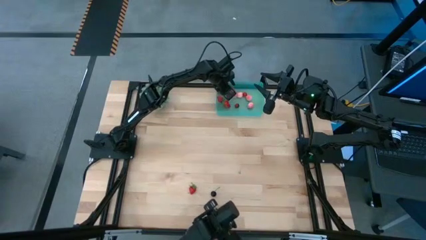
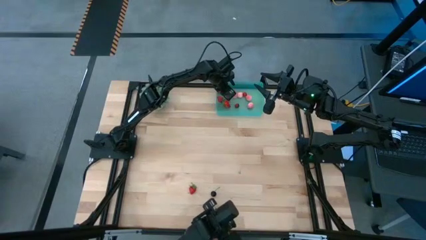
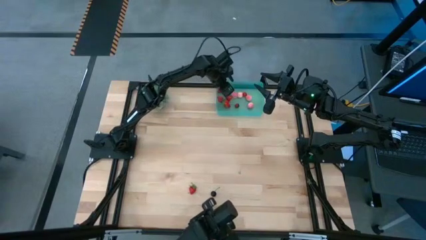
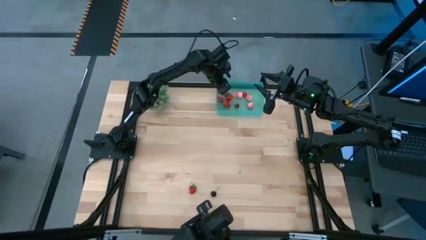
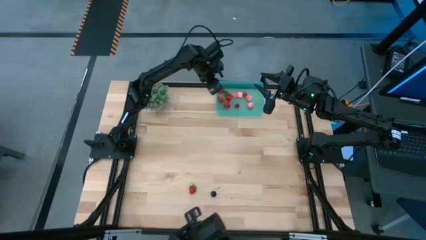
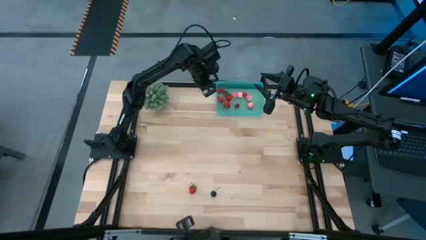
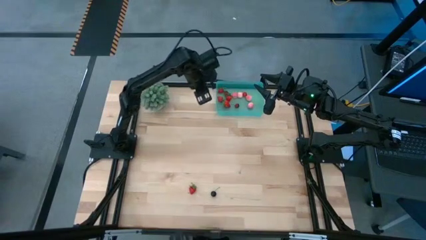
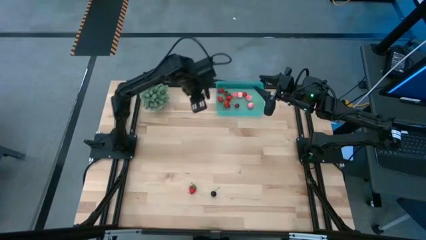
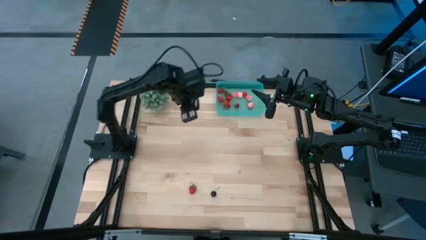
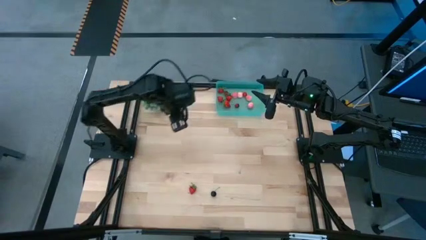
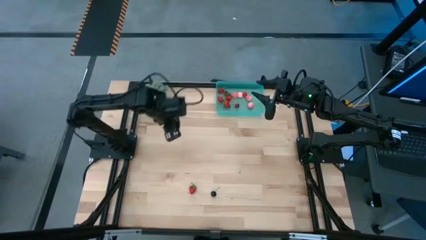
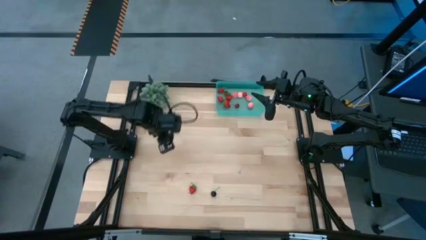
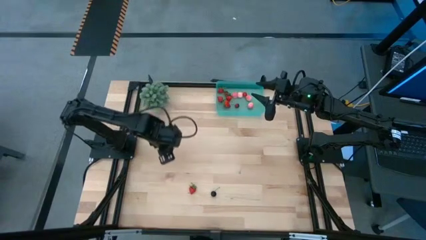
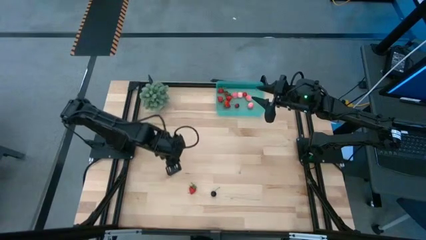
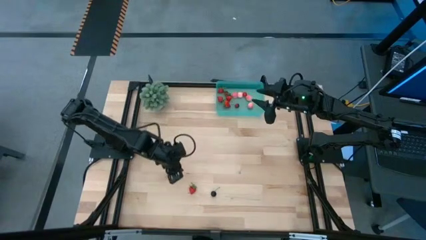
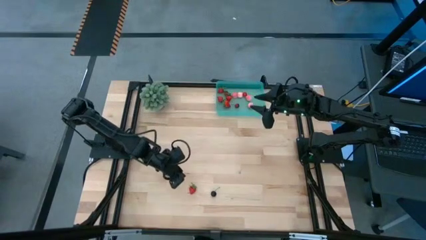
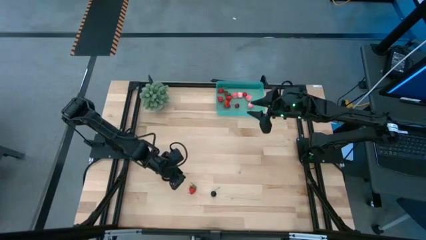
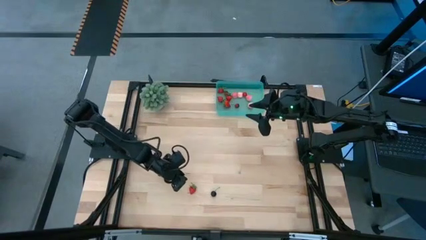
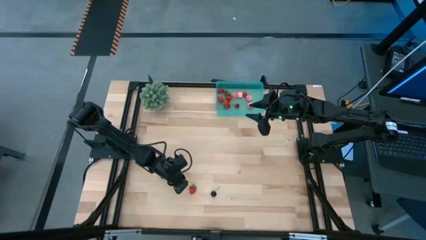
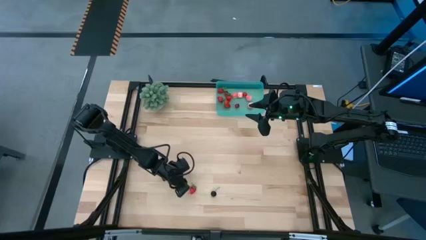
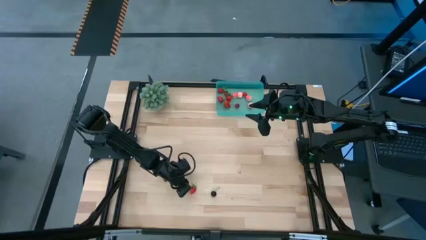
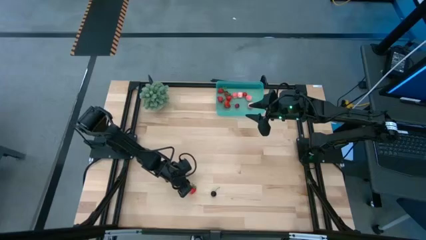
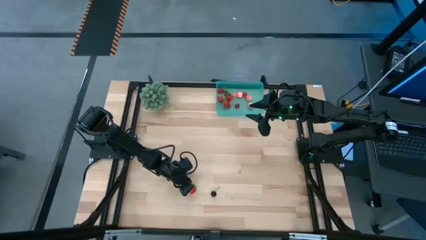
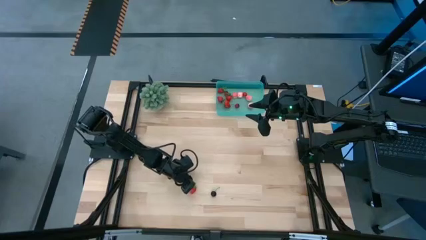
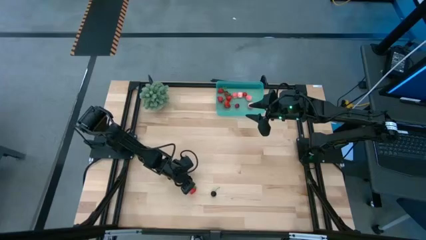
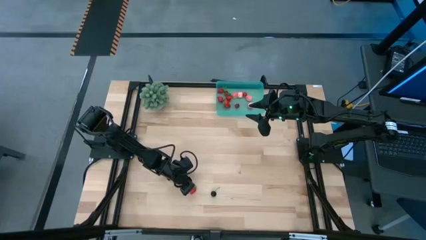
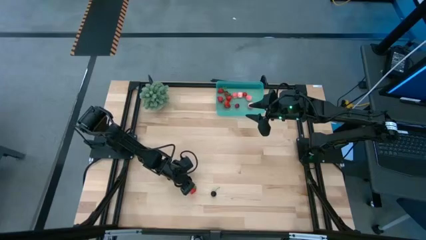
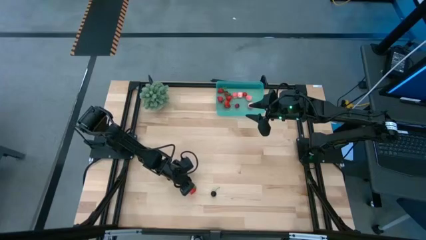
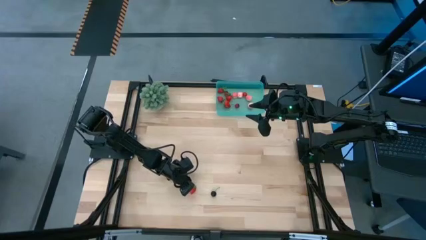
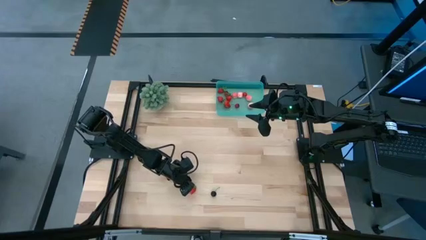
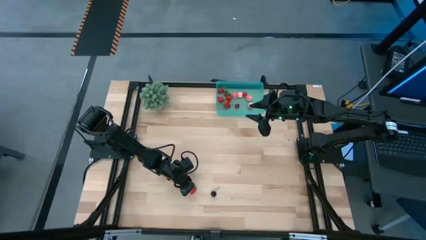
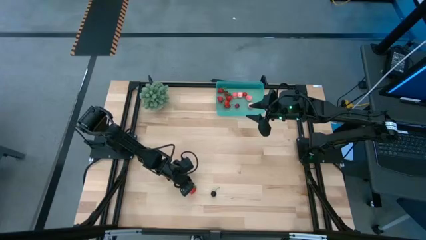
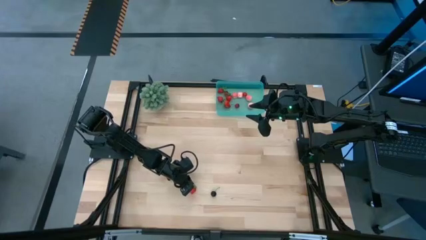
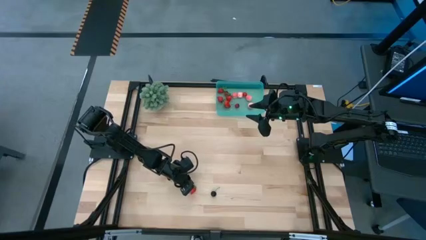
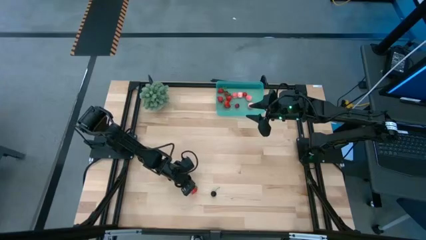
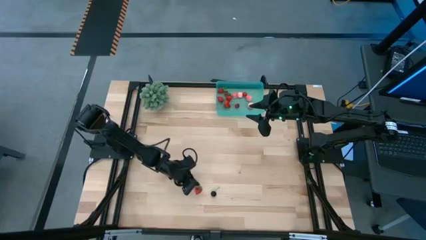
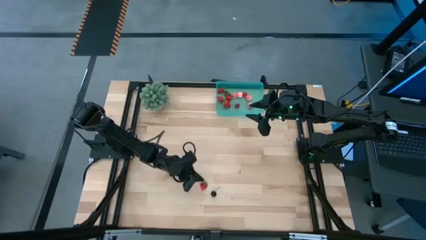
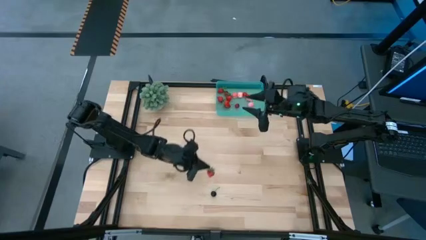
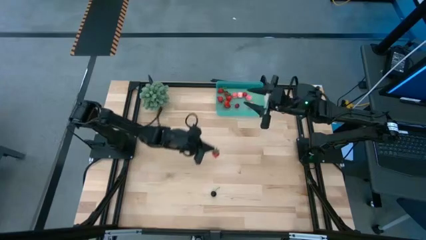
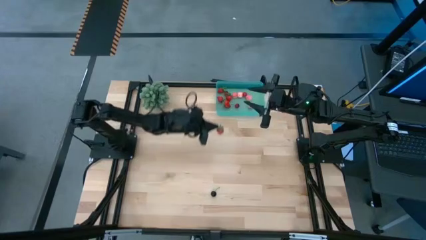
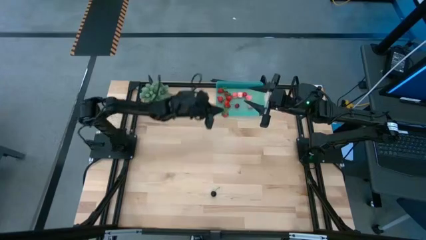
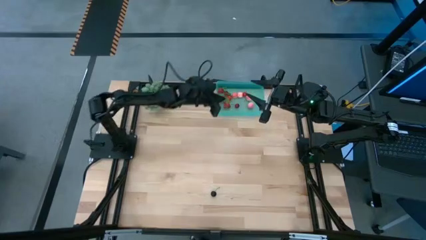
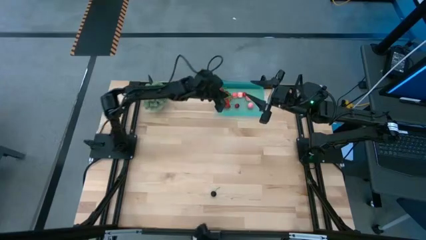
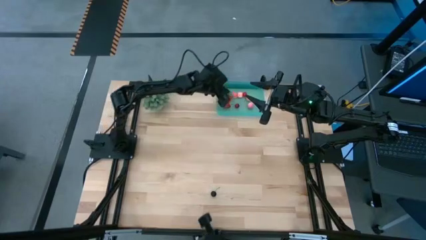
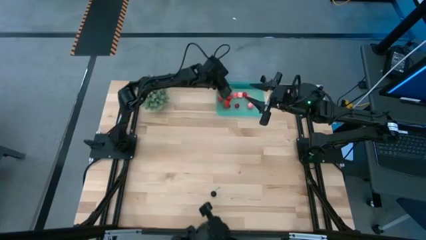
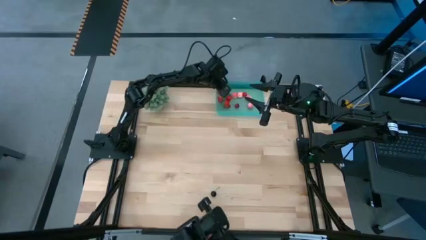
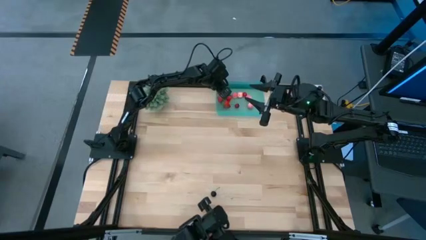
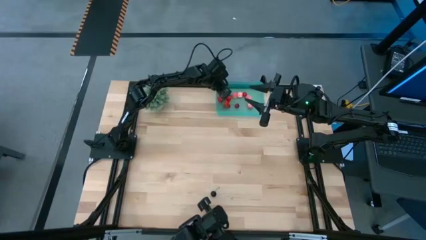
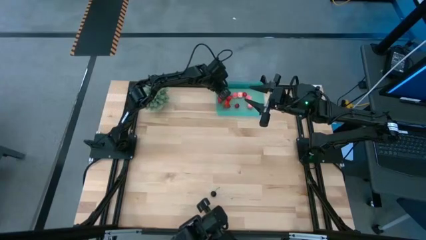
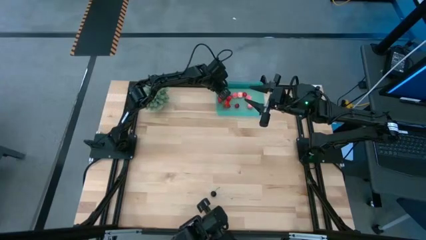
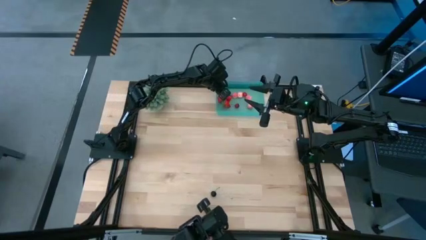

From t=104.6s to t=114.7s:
Task: Pick and placing Produce into tupperware
Put the strawberry into the blue bin

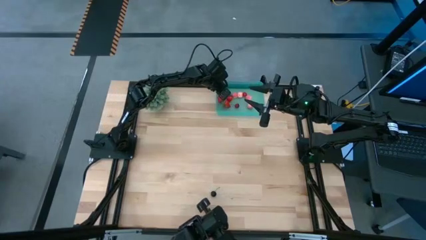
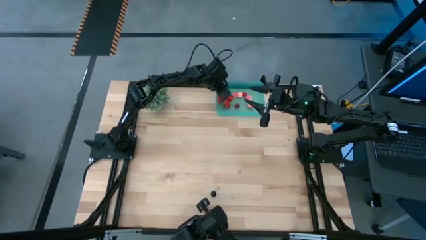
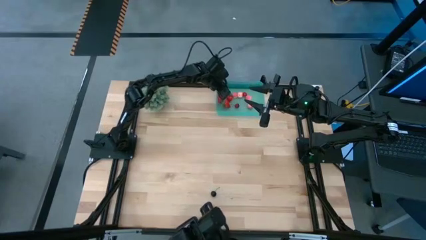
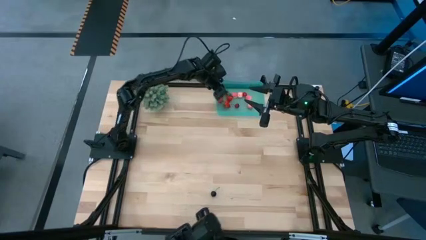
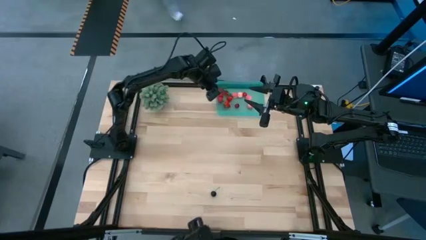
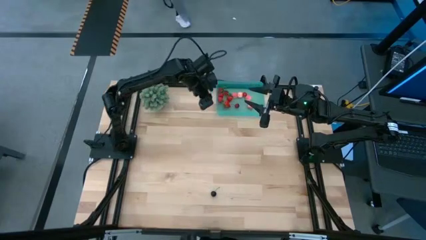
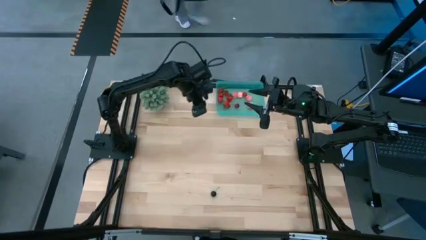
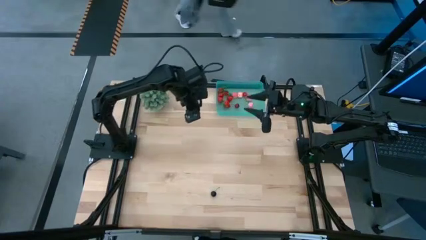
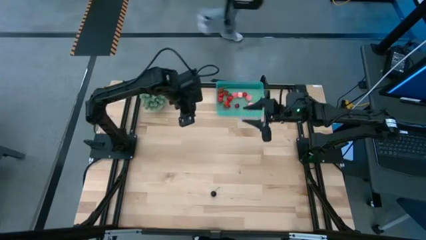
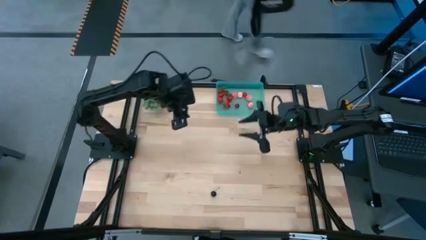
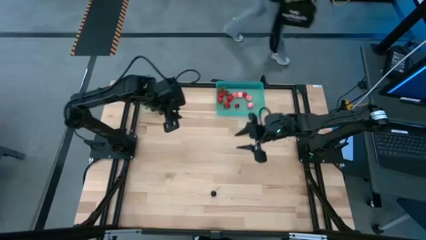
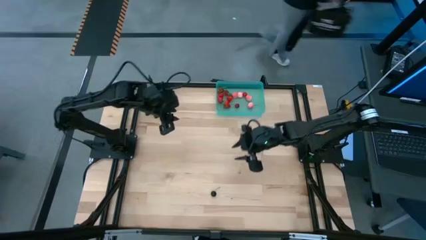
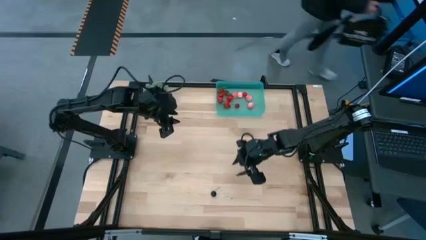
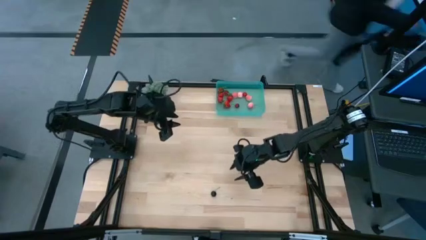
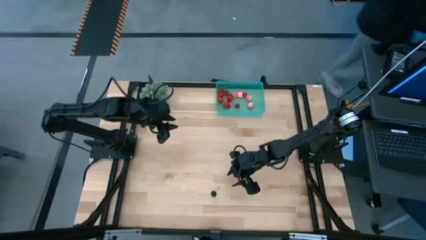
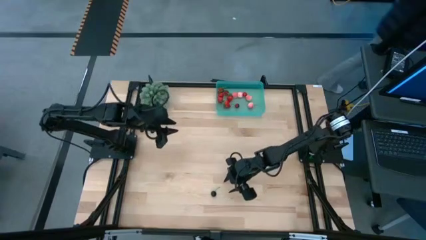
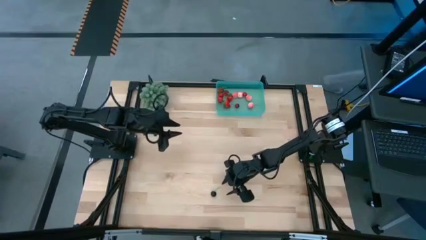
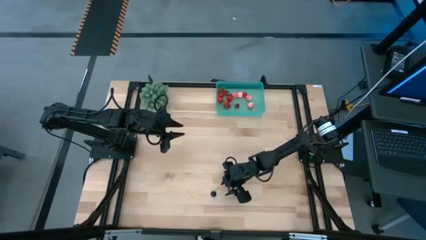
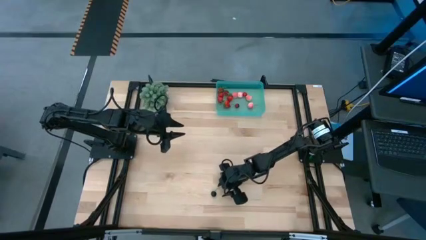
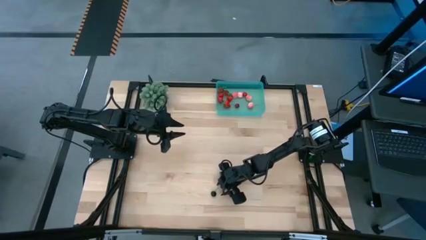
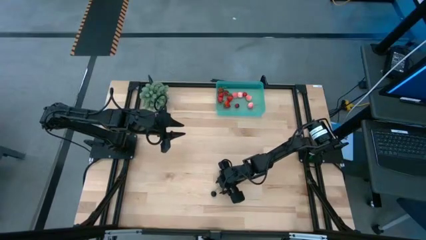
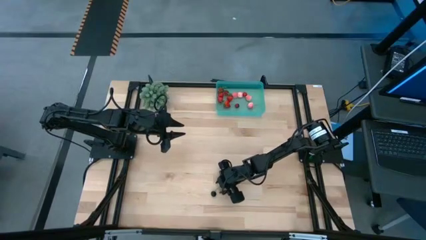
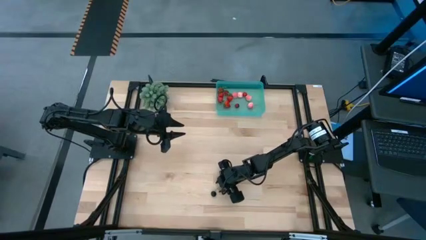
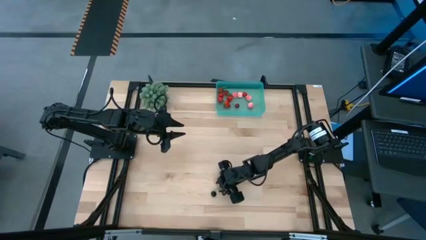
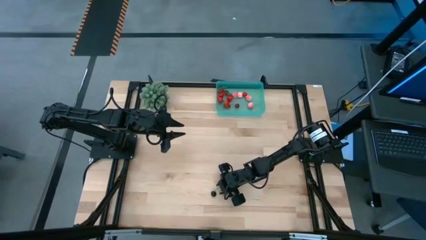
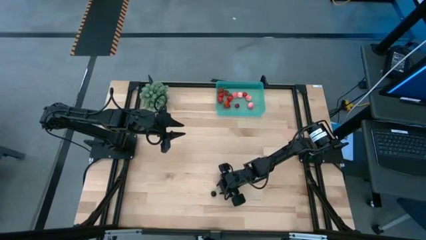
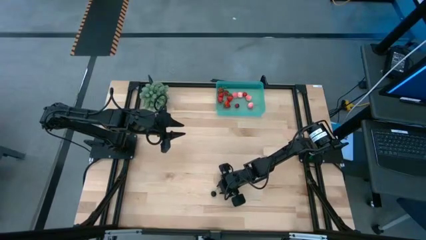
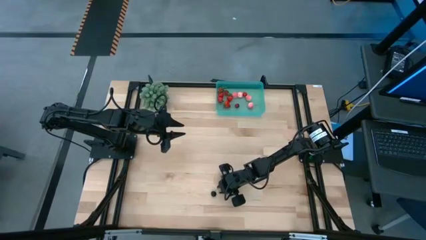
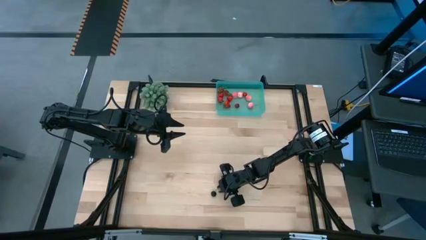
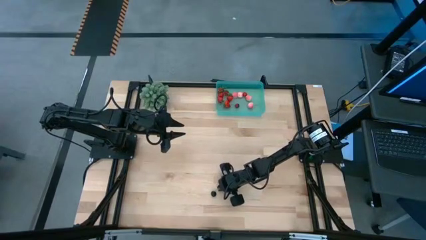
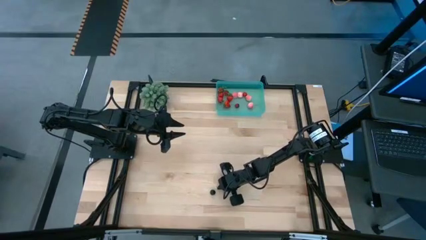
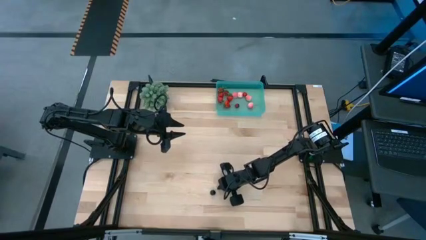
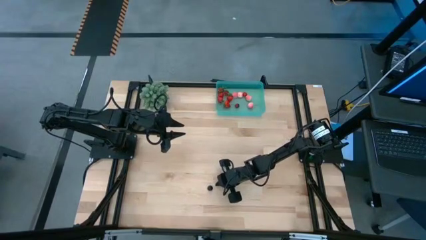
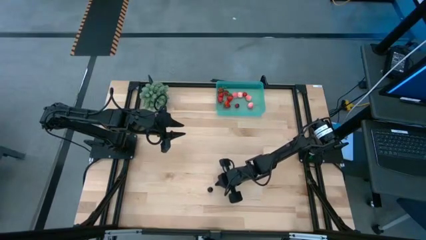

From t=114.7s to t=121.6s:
Put the cherry into the blue bin
